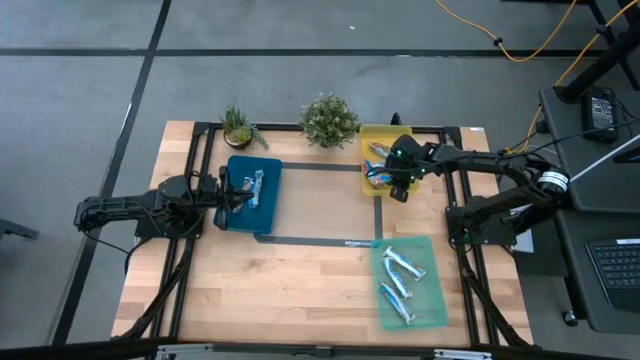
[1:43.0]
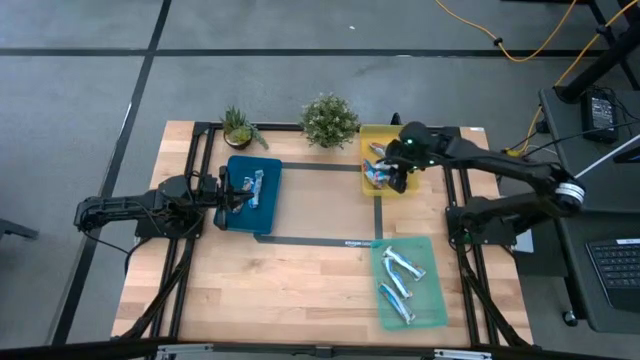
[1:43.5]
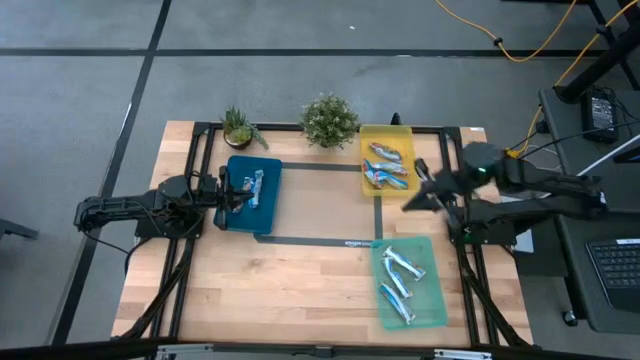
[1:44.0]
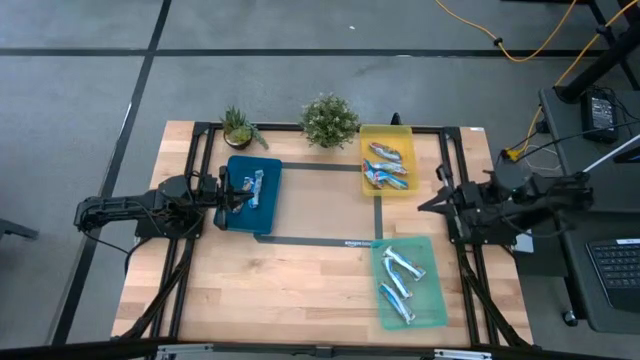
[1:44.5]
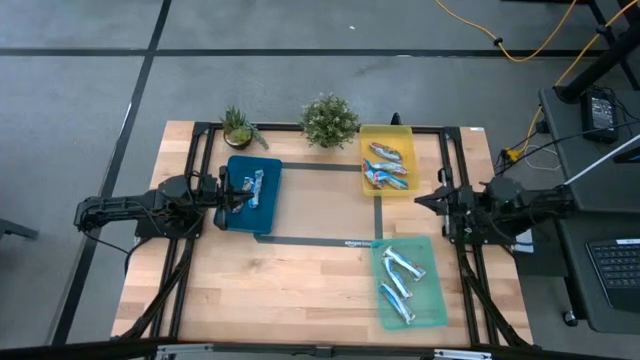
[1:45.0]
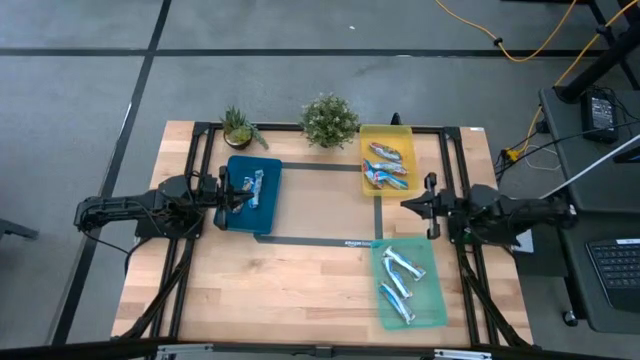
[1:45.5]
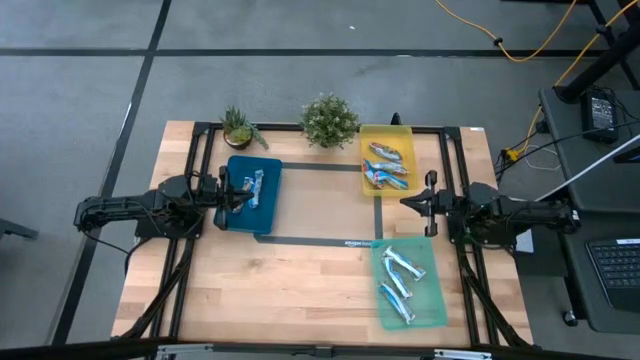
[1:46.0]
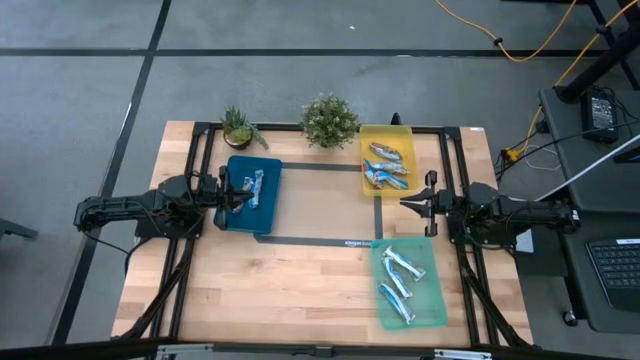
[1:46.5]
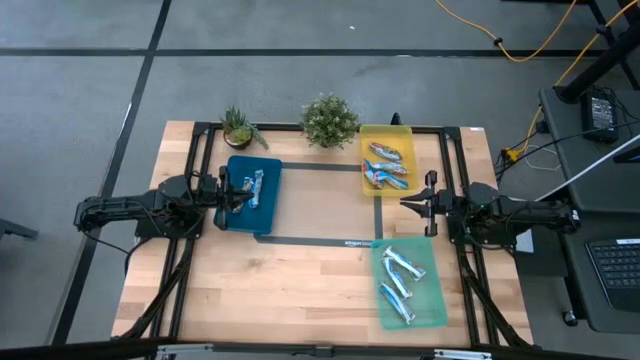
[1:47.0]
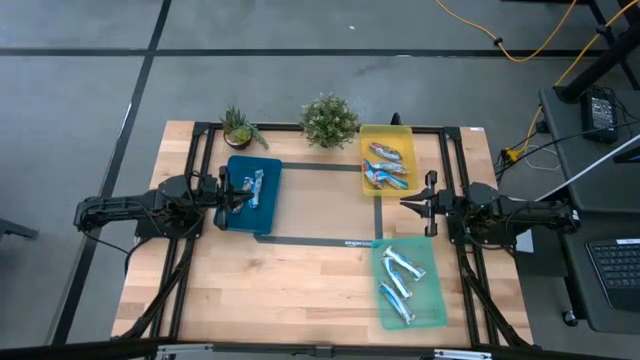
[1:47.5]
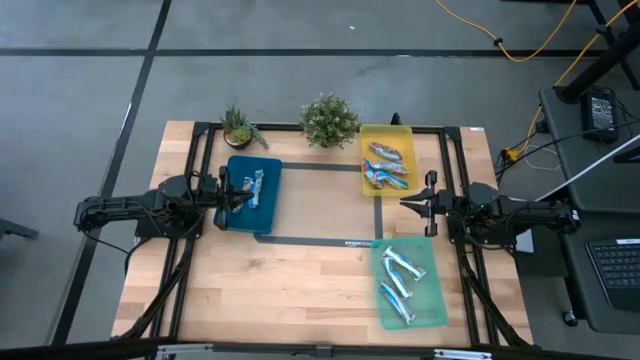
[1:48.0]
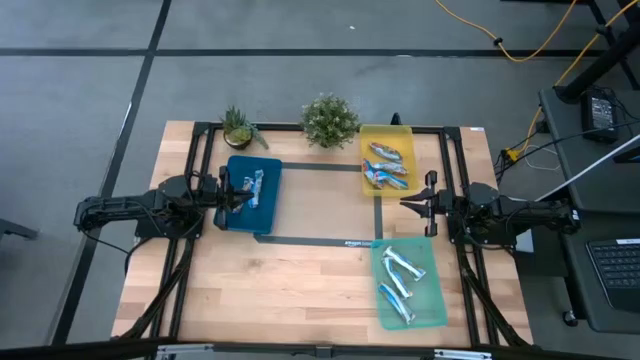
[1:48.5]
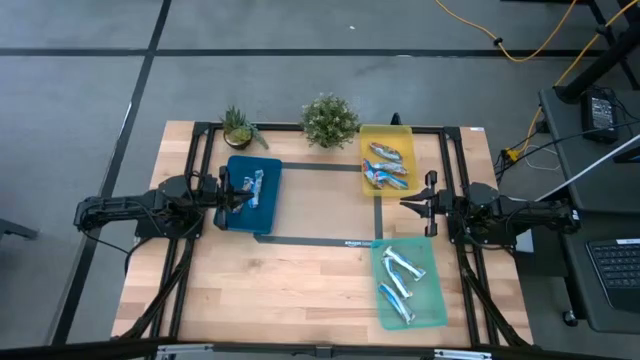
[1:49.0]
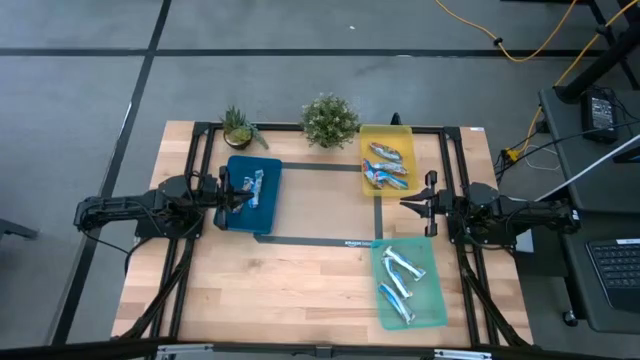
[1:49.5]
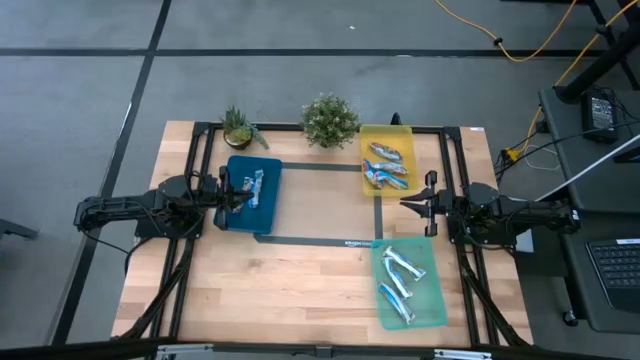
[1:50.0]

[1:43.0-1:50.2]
Task: Pick and place Granola Bars by type
Return to Home Position

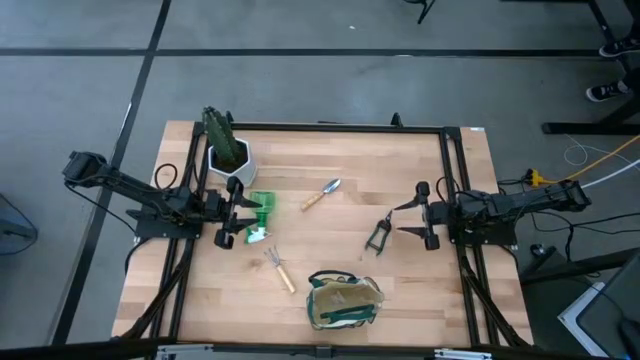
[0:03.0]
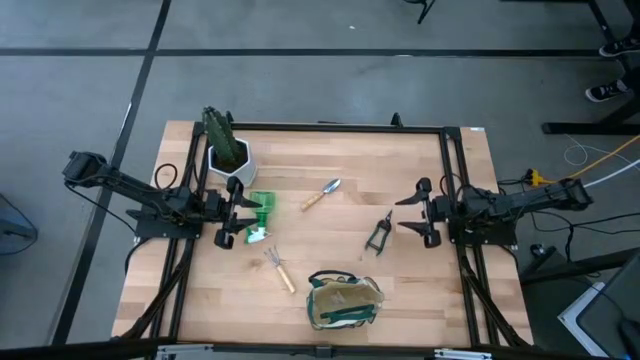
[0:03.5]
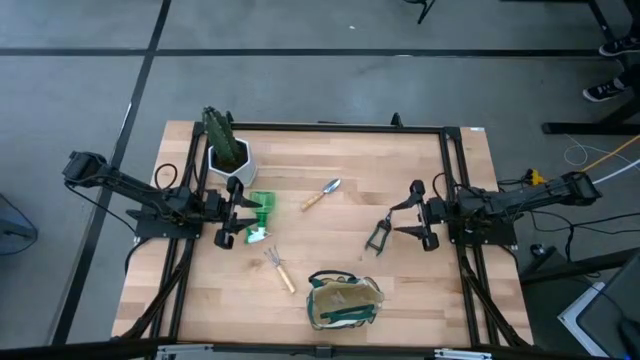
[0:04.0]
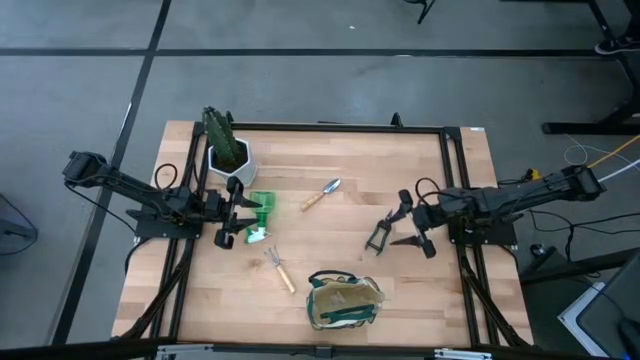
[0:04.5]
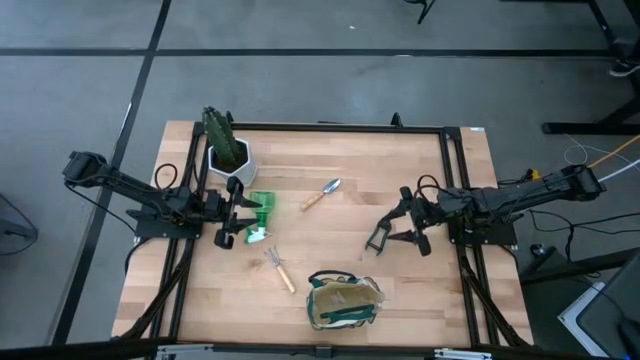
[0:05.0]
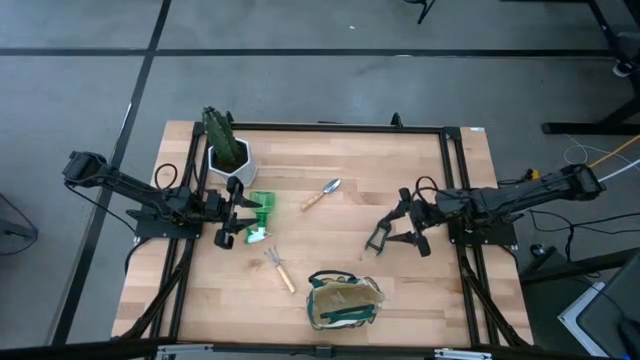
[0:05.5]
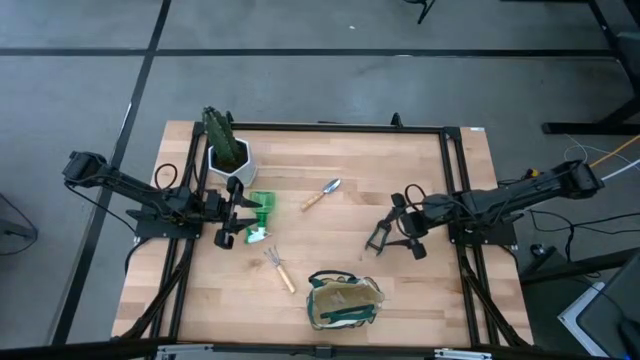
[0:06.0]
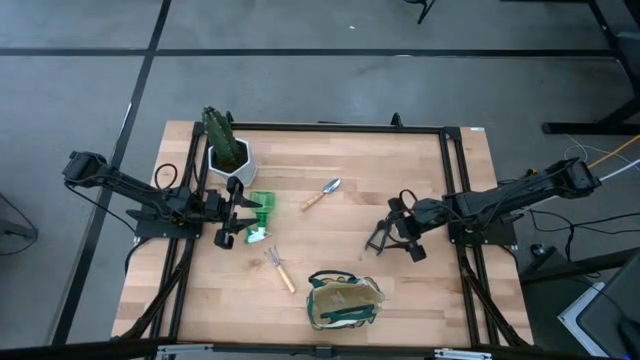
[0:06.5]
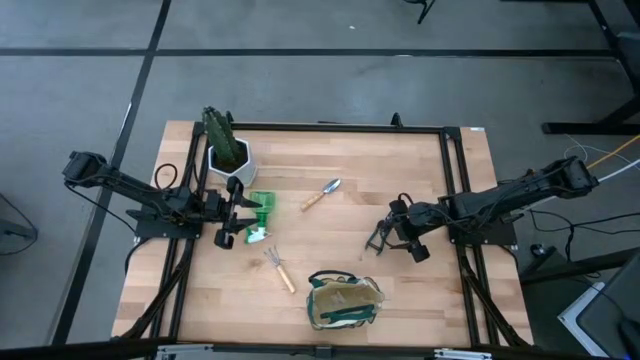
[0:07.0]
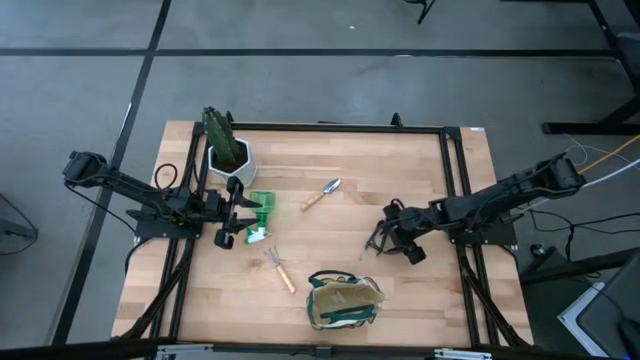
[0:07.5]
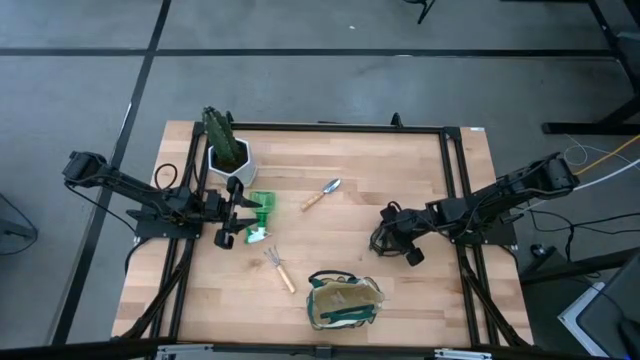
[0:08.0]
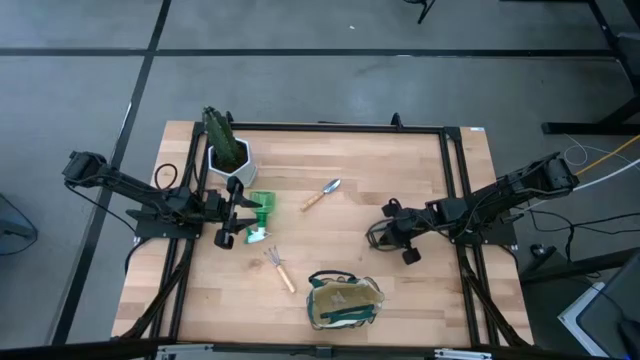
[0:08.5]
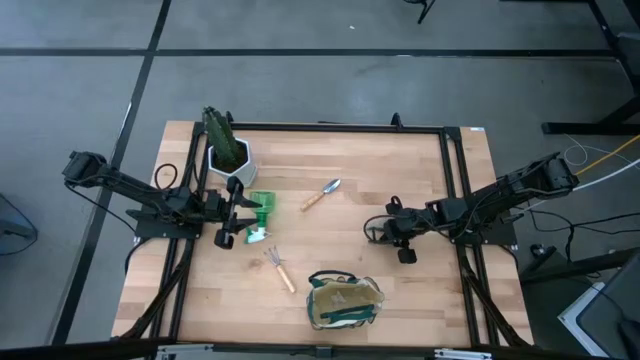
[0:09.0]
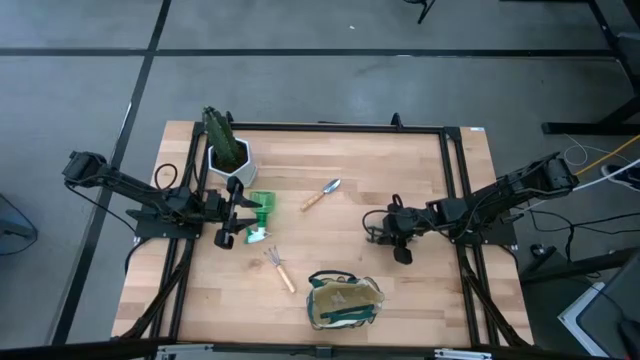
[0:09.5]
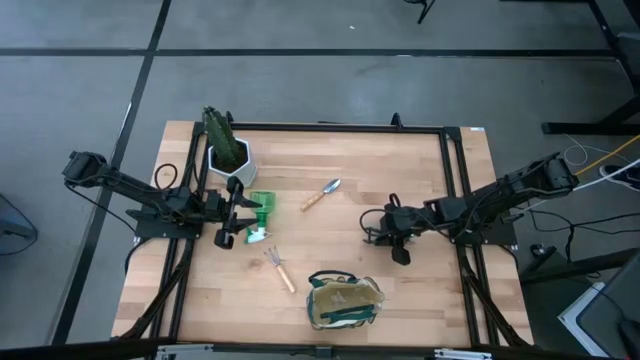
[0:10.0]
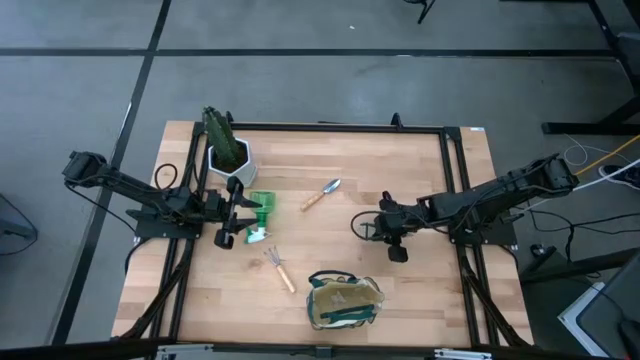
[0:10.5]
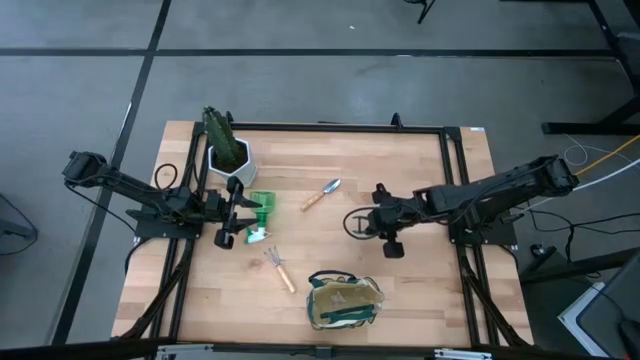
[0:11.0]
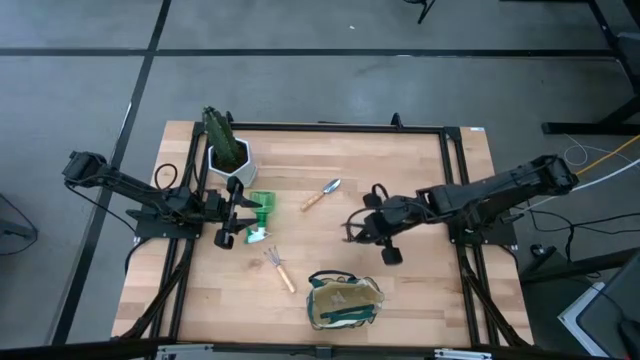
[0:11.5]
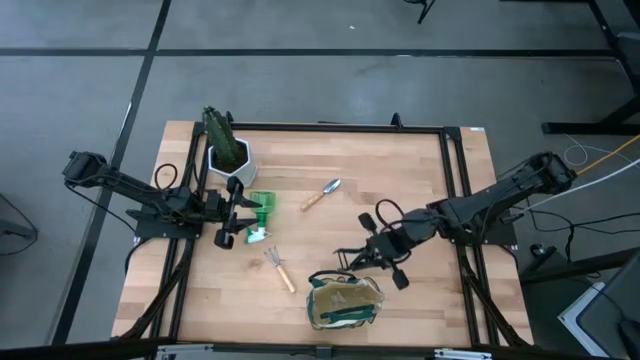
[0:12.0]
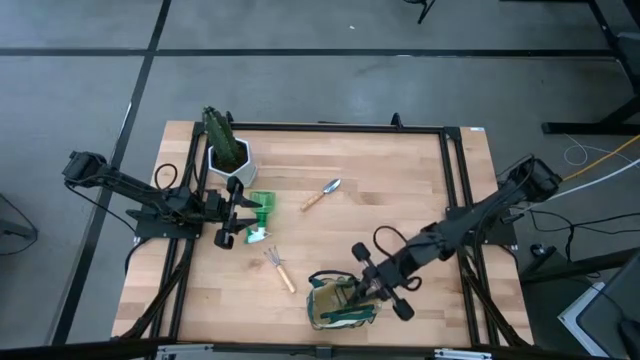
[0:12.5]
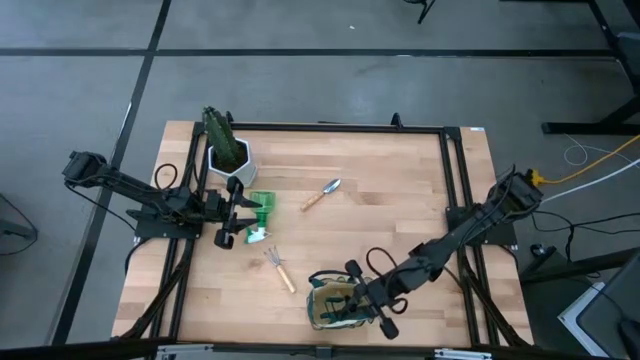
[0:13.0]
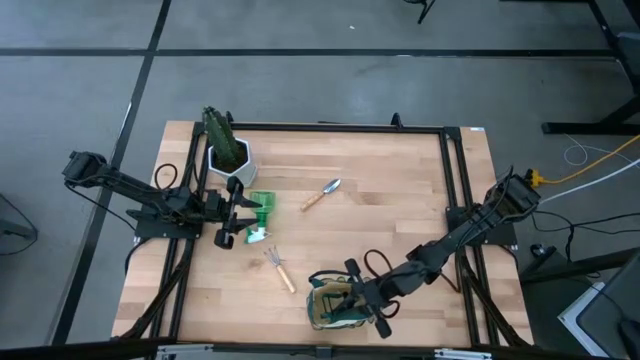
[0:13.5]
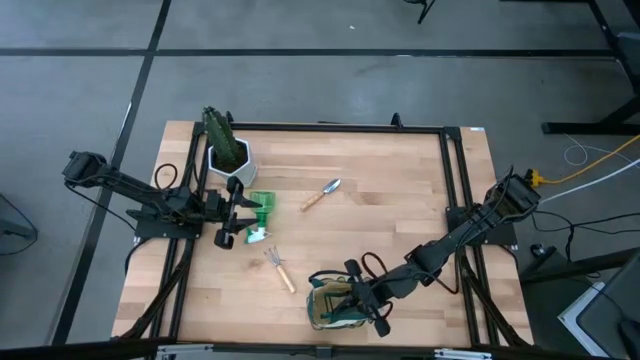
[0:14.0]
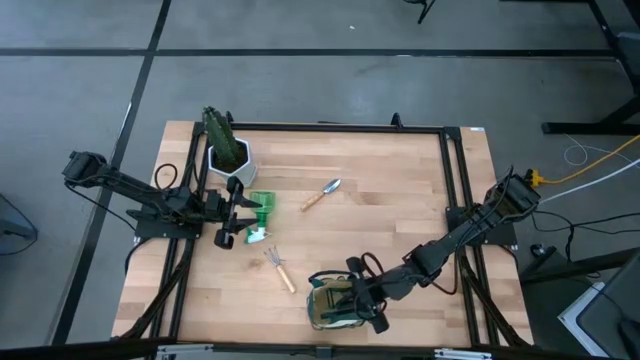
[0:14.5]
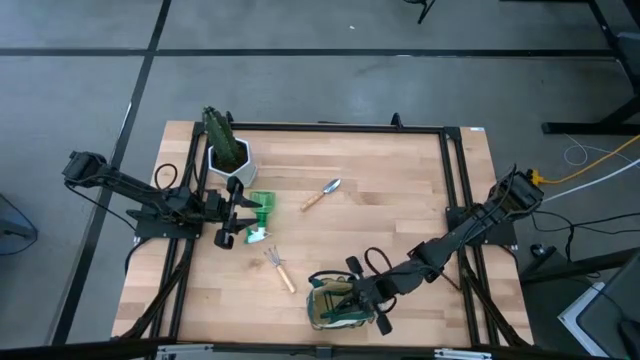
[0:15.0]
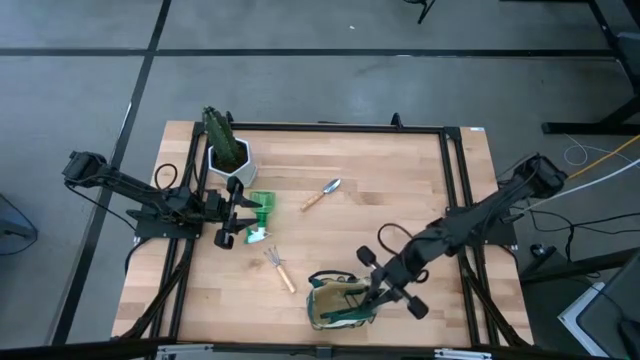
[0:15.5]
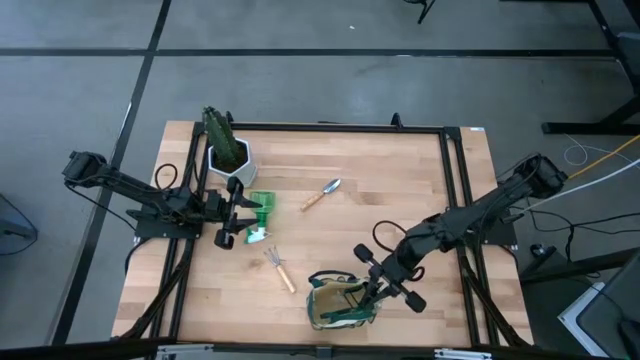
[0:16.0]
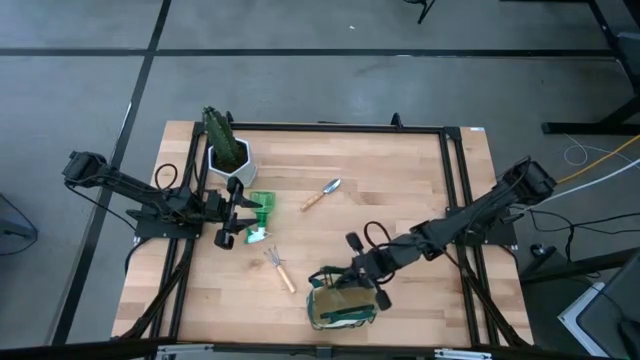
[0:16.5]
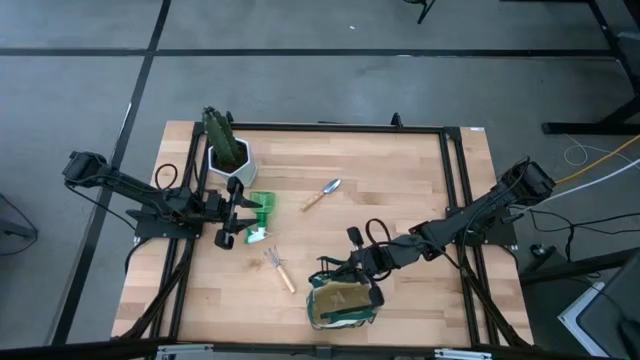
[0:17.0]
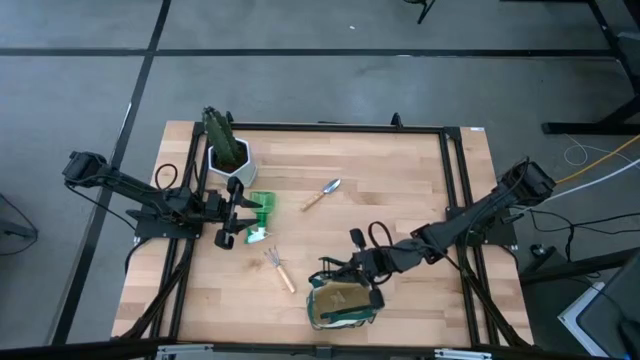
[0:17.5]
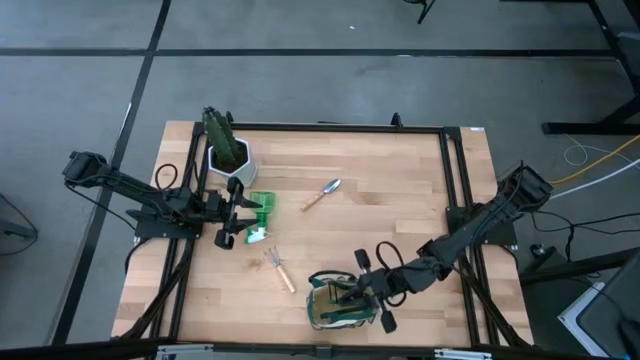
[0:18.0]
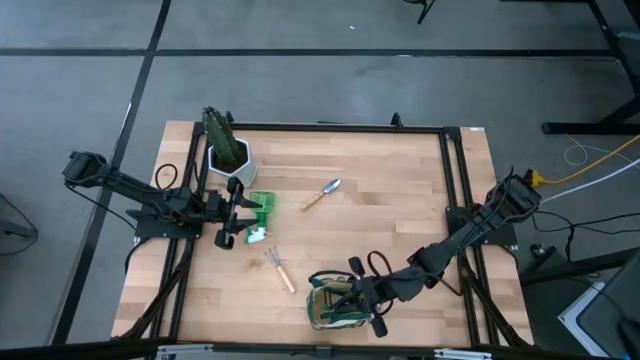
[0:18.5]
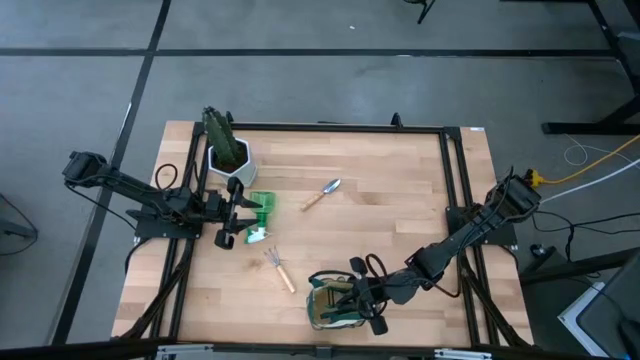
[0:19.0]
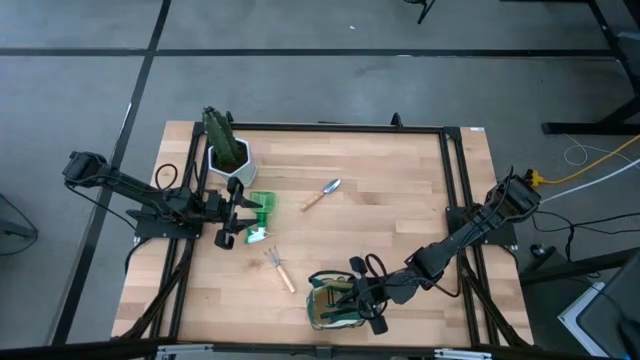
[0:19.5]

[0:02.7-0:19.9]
Task: Pick & Place Garden tools in Gardening bag
Put the green shear scissors into the brown gardening bag
